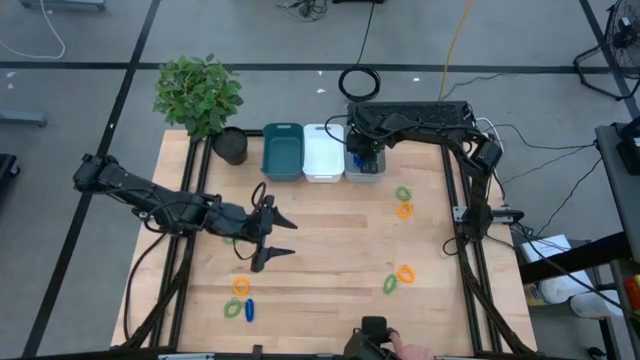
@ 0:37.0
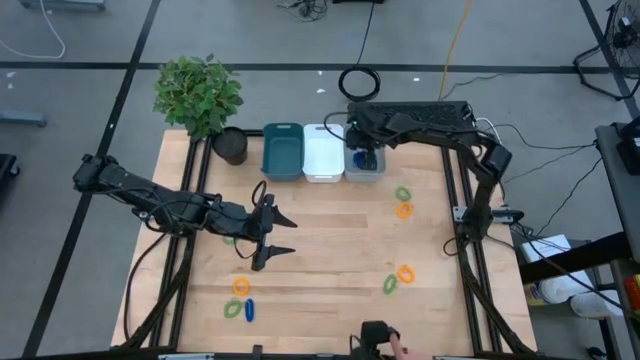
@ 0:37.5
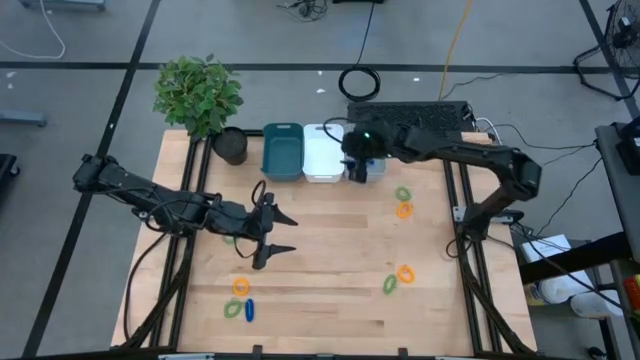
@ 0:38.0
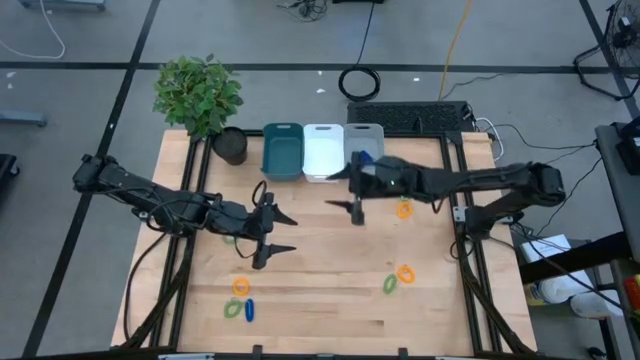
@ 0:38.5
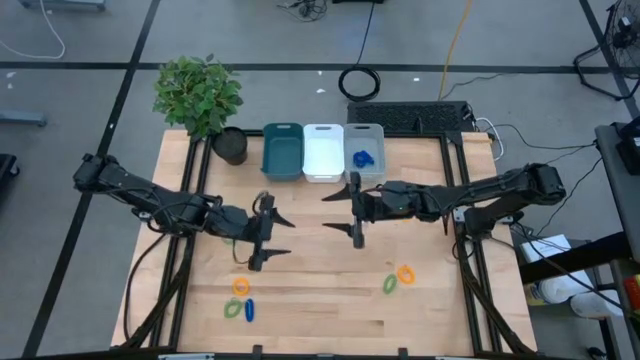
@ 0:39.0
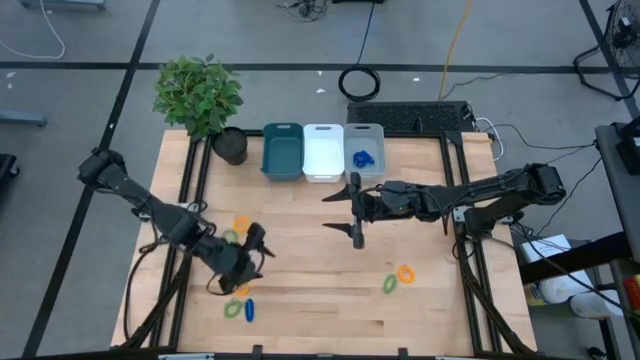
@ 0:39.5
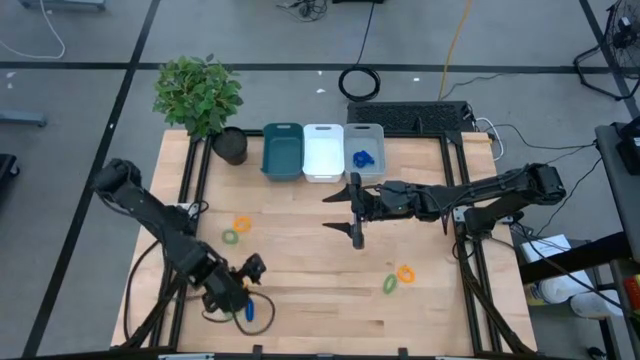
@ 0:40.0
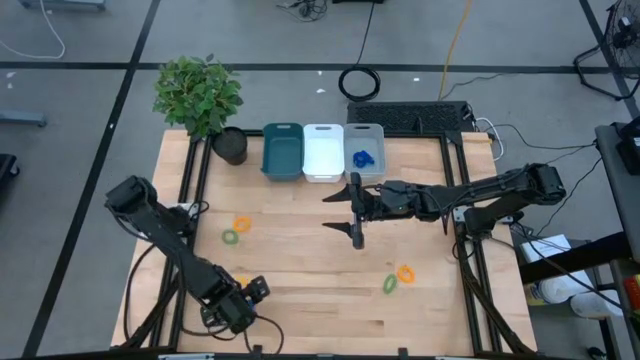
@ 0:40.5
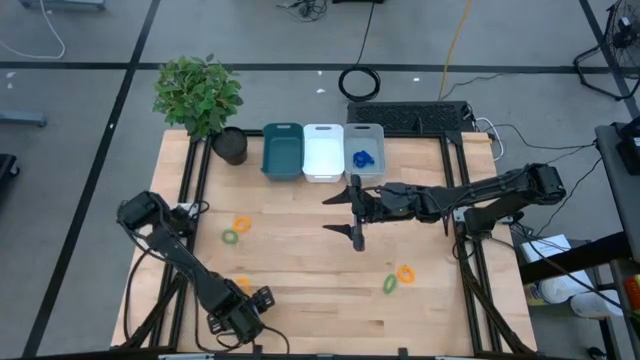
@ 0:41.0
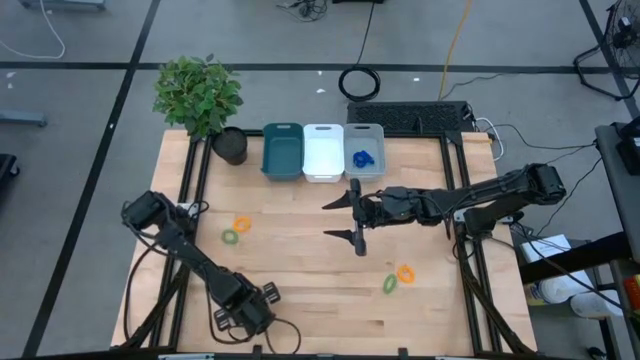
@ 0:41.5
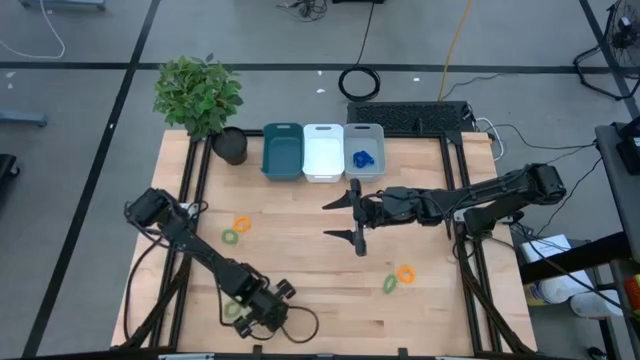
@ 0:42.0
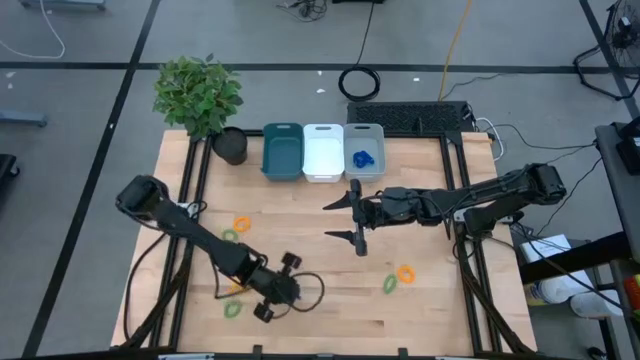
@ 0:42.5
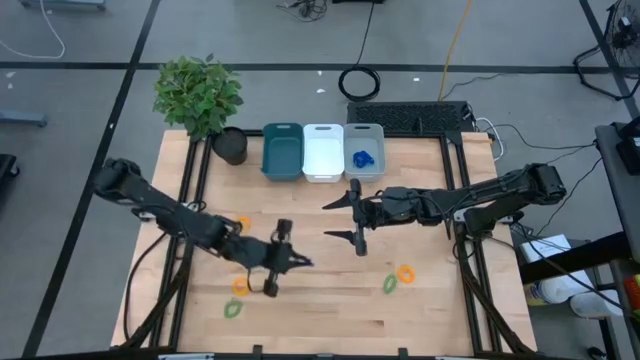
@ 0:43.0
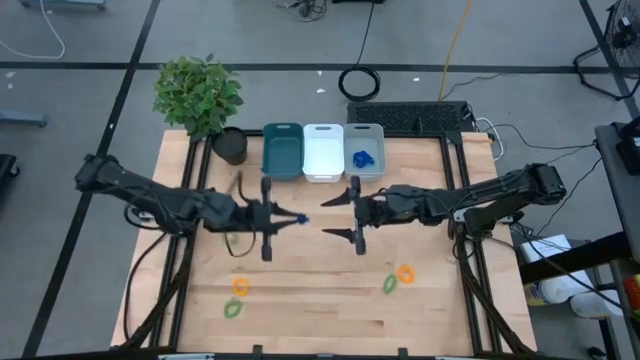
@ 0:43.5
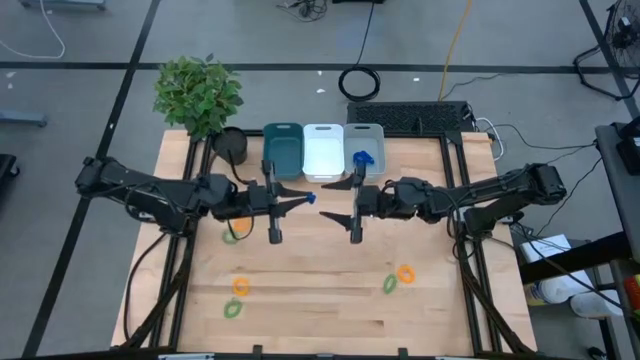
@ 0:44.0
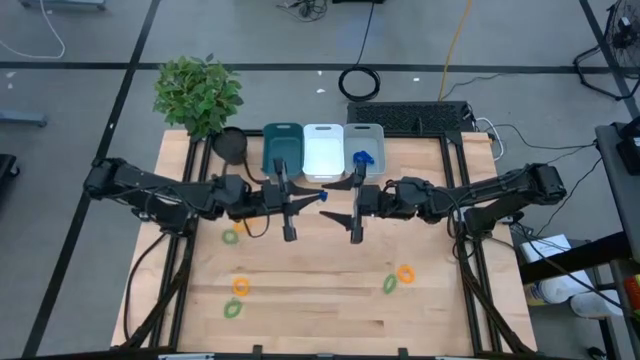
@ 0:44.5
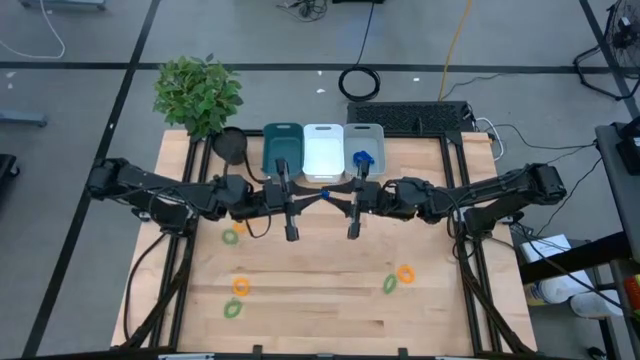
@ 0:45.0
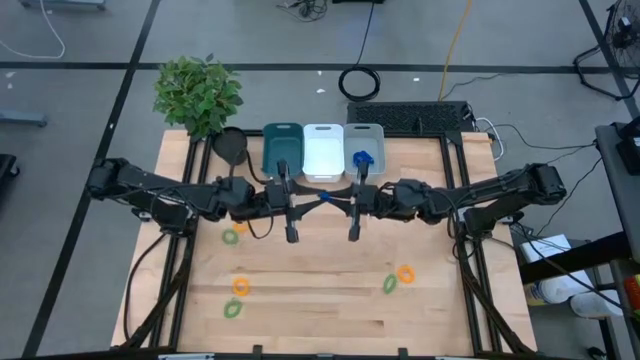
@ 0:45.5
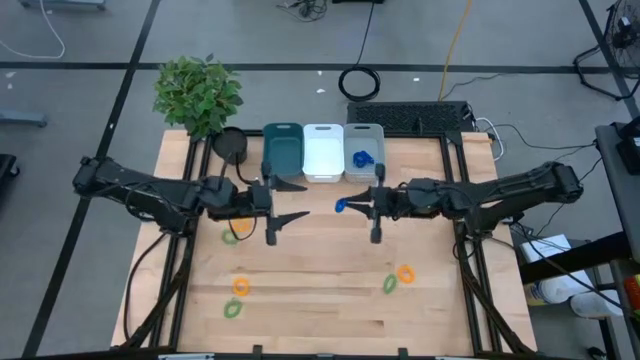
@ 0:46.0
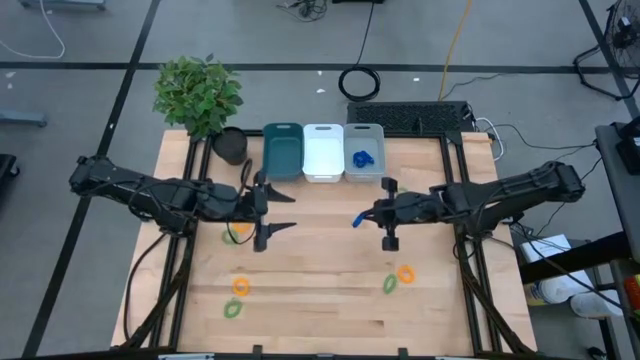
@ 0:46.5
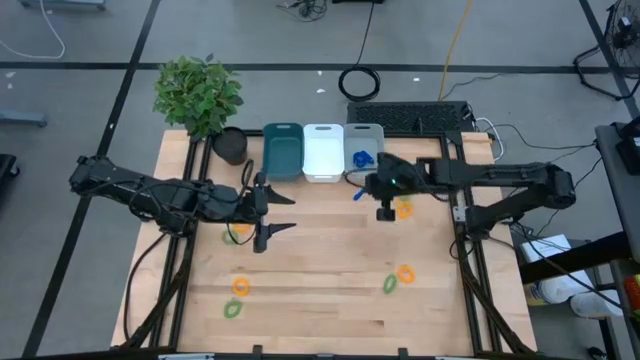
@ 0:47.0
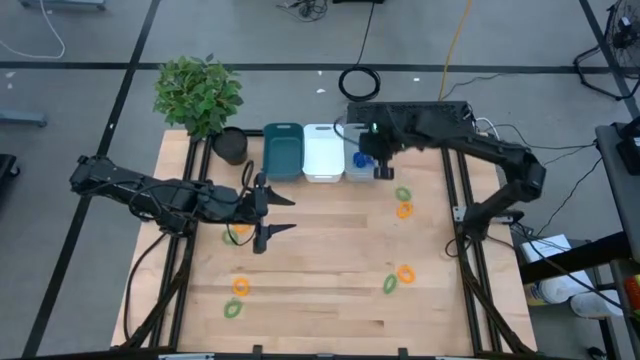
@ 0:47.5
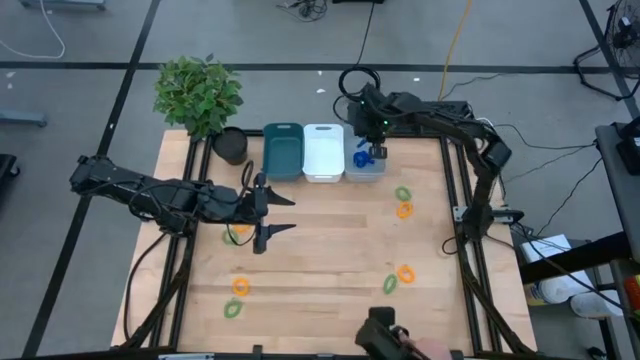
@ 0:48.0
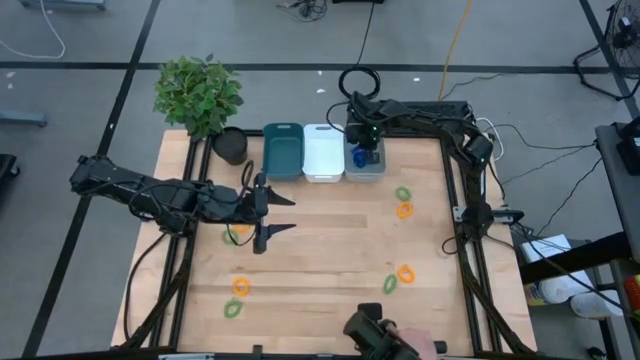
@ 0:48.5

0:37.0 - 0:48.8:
Task: Sort spring keychains
Put the blue spring keychain in the gray bin

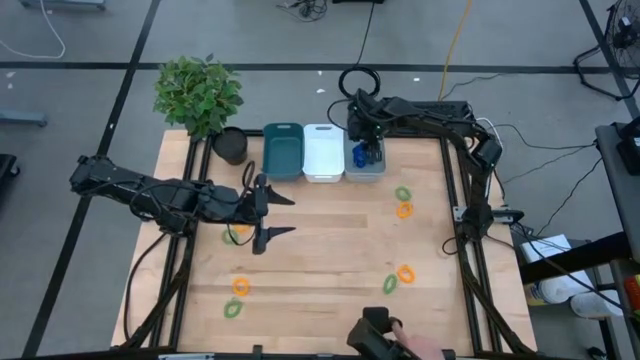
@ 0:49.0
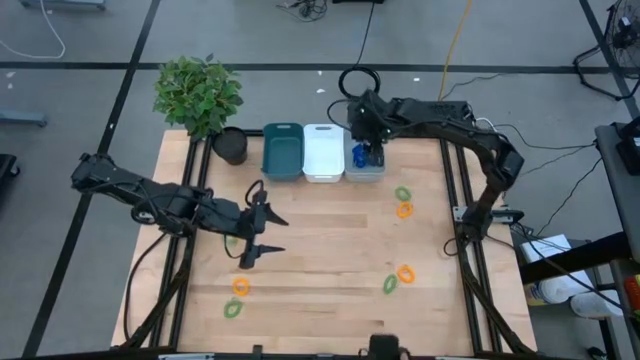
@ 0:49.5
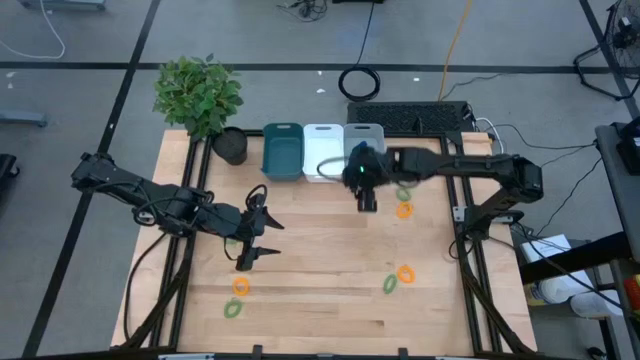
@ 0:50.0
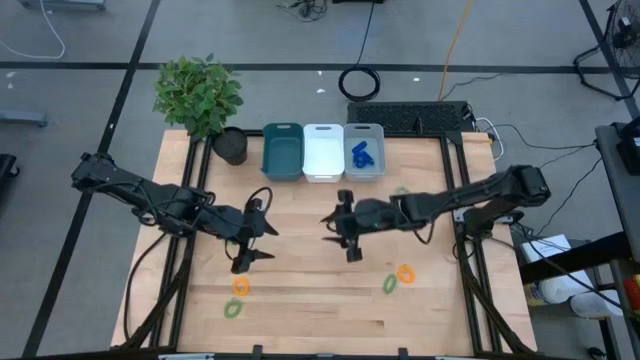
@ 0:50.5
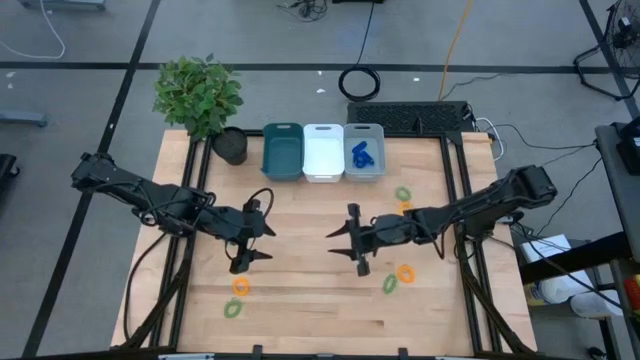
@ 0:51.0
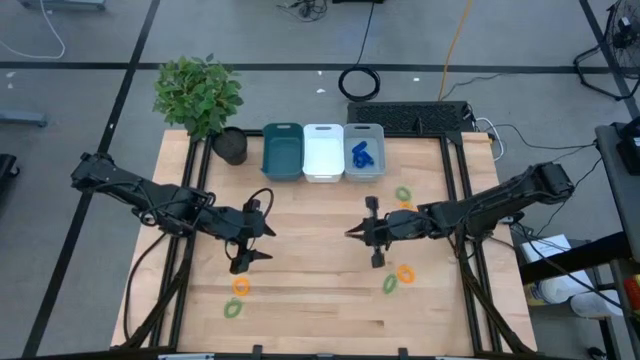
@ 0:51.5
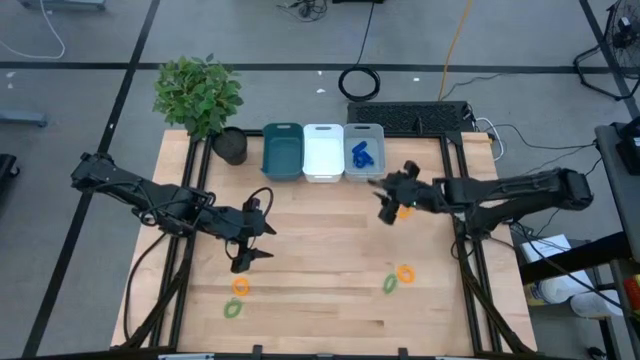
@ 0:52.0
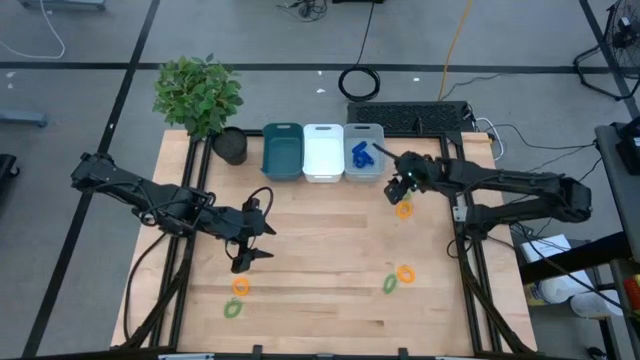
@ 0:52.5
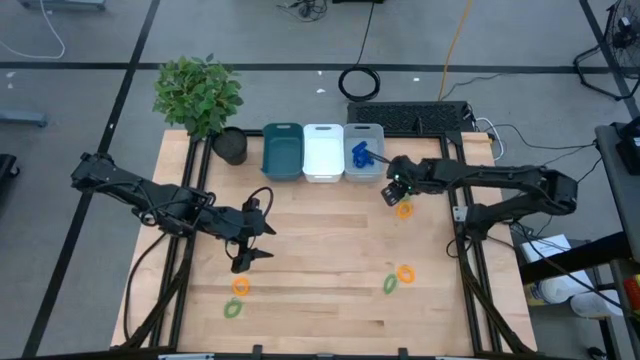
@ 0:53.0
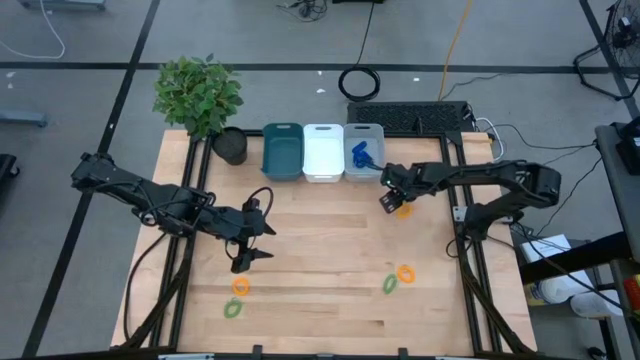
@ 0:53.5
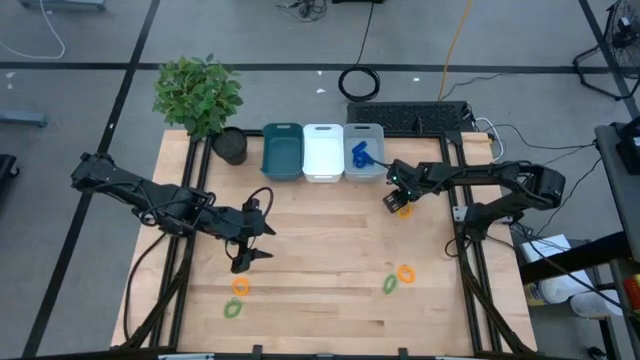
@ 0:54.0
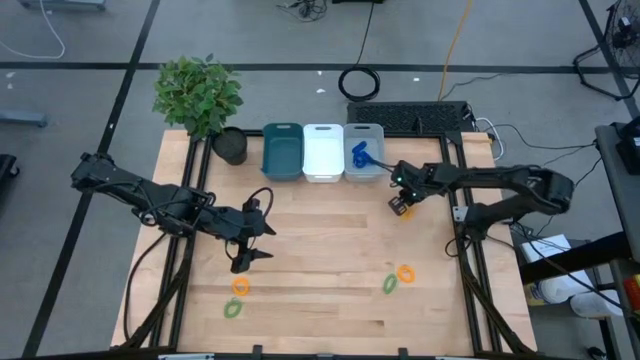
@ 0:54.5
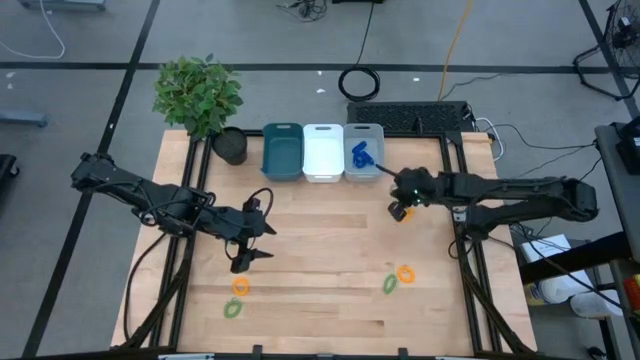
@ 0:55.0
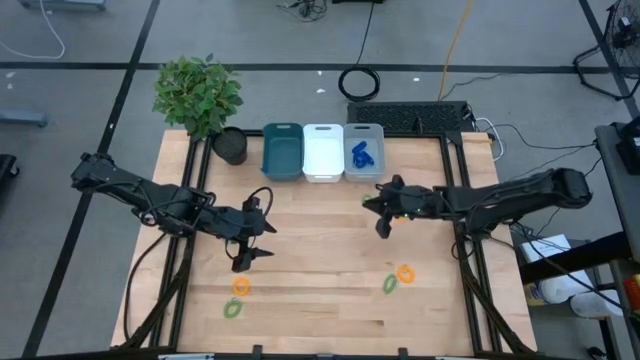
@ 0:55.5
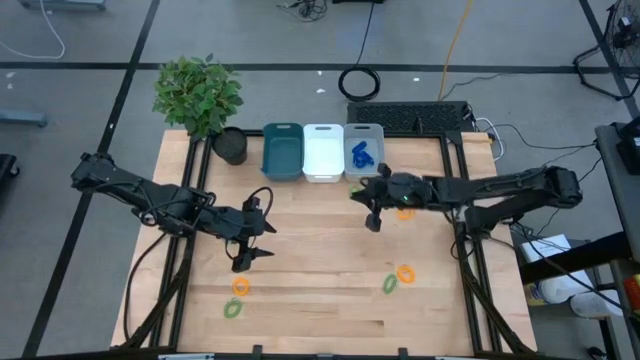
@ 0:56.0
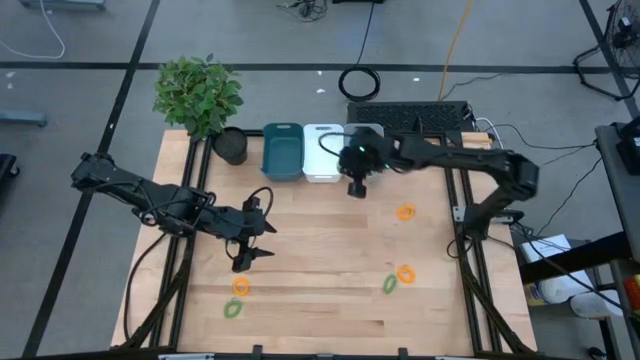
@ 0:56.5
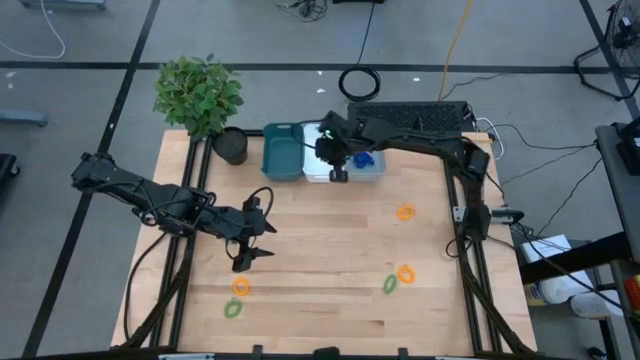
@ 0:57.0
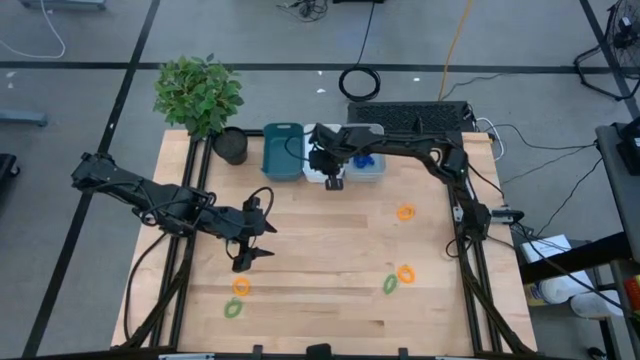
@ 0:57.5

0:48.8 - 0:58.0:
Put the green spring keychain in the white bin
